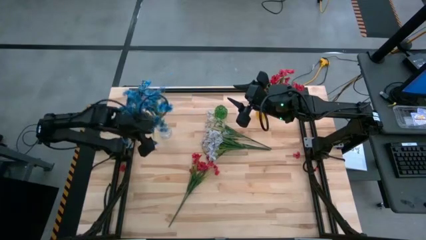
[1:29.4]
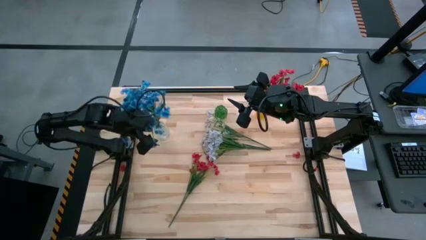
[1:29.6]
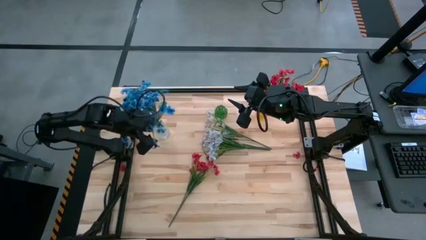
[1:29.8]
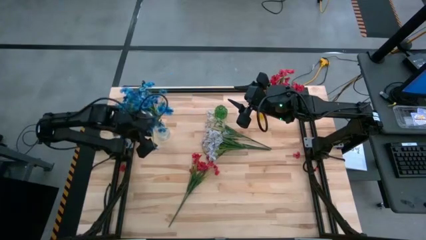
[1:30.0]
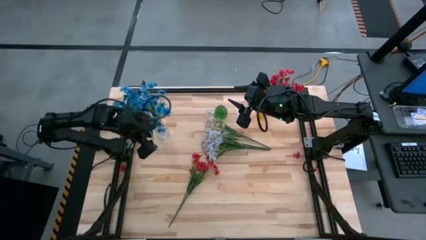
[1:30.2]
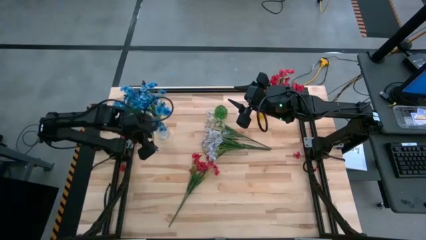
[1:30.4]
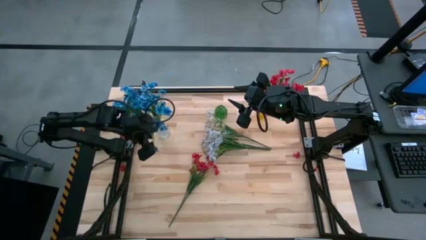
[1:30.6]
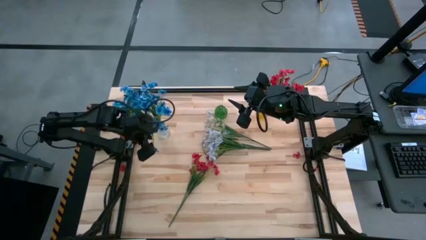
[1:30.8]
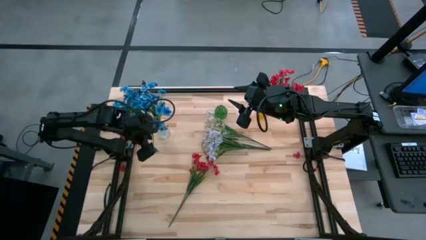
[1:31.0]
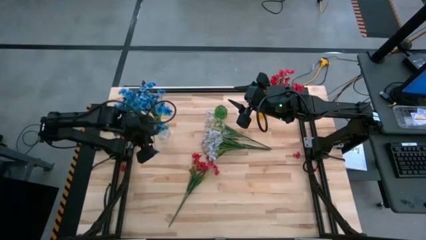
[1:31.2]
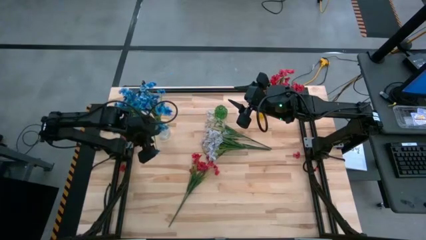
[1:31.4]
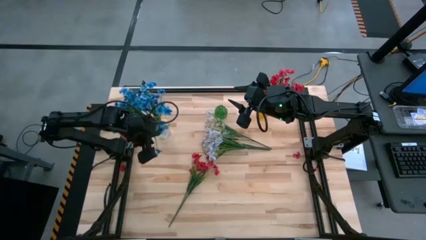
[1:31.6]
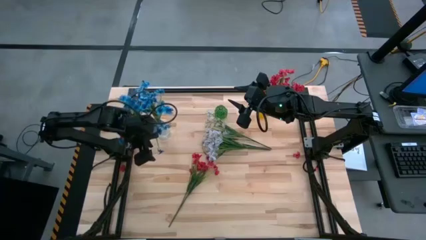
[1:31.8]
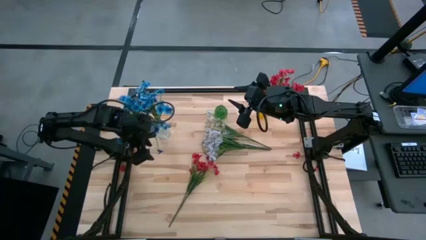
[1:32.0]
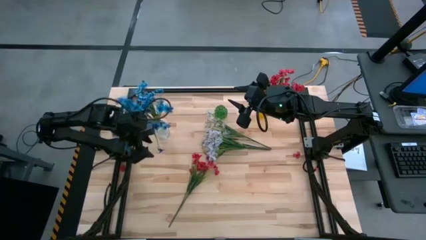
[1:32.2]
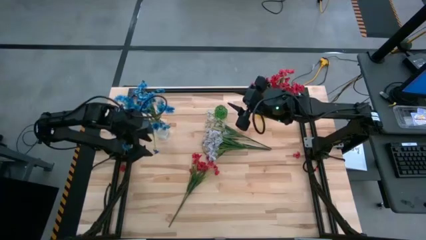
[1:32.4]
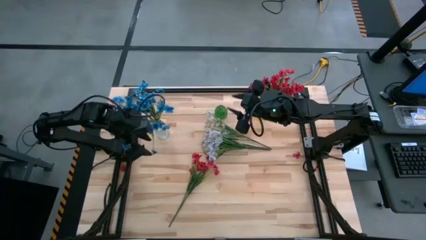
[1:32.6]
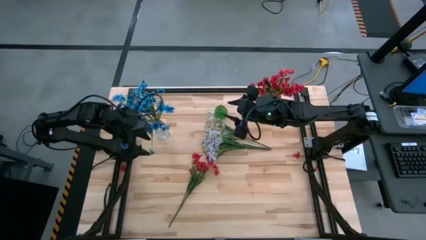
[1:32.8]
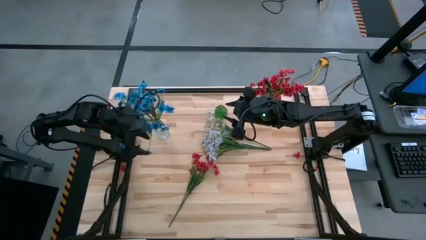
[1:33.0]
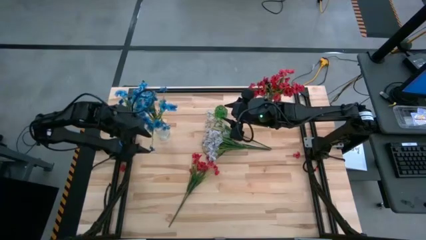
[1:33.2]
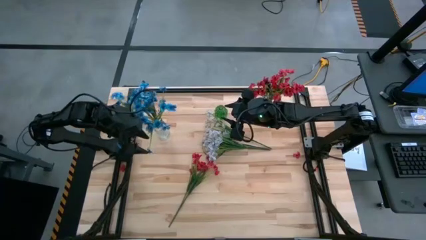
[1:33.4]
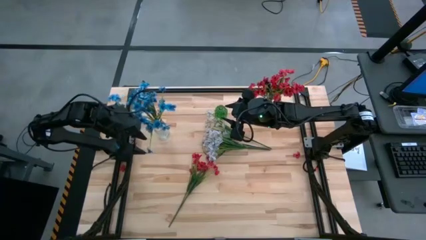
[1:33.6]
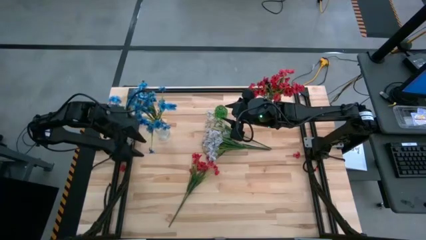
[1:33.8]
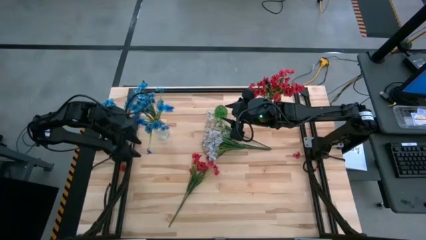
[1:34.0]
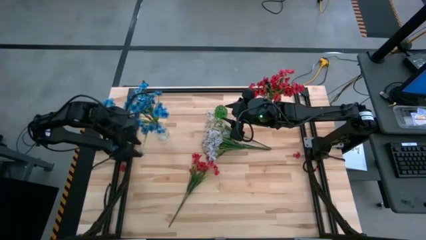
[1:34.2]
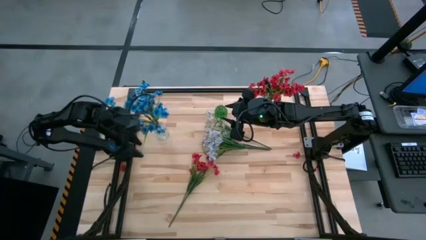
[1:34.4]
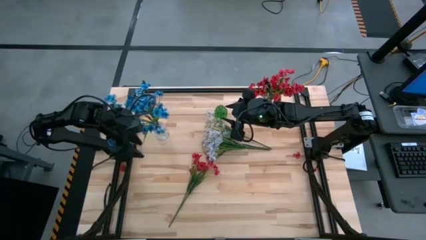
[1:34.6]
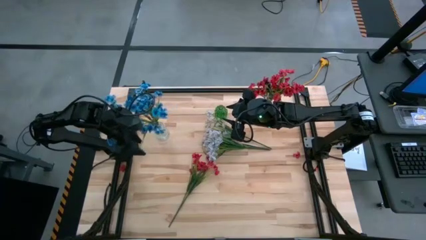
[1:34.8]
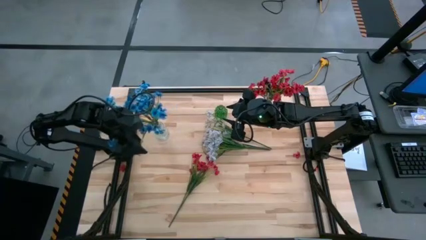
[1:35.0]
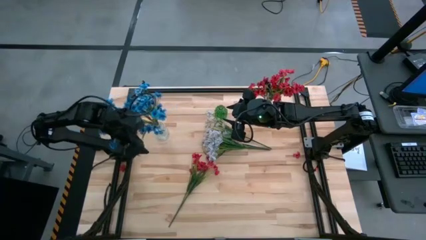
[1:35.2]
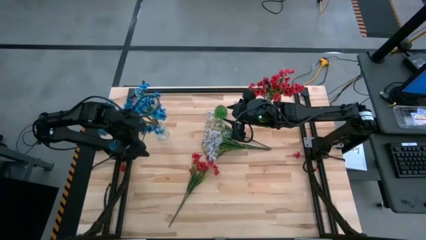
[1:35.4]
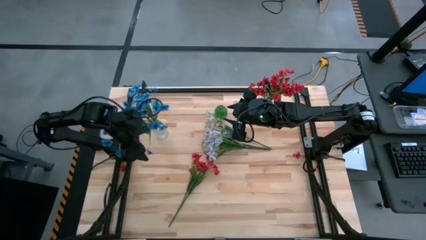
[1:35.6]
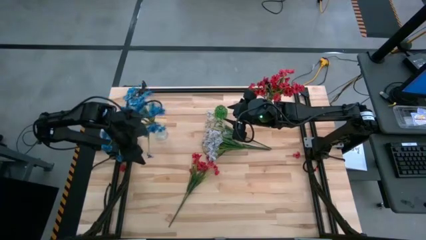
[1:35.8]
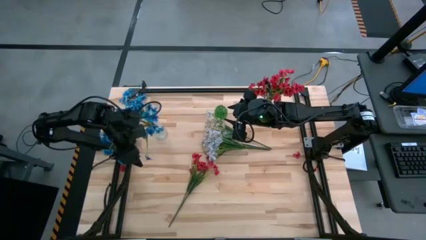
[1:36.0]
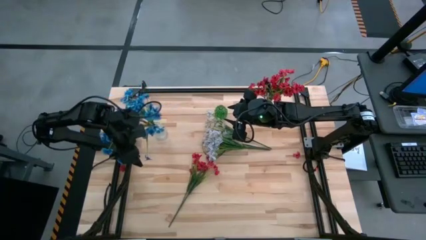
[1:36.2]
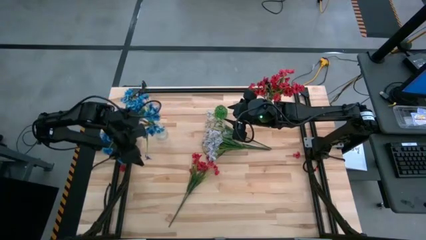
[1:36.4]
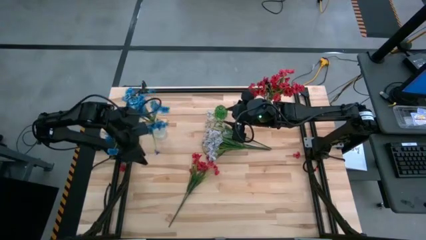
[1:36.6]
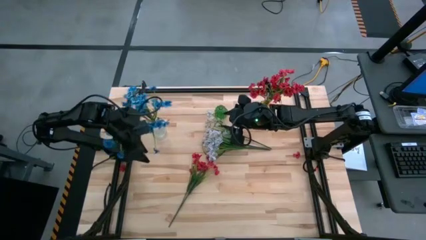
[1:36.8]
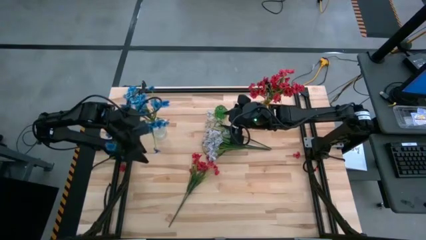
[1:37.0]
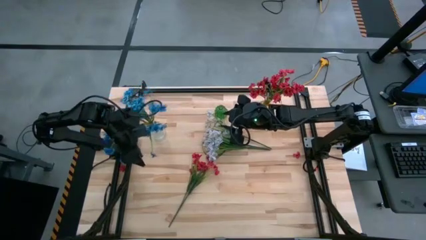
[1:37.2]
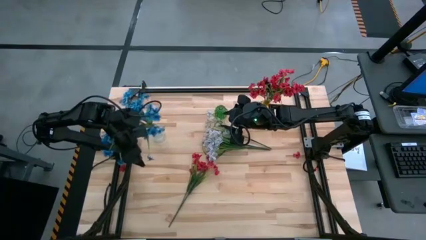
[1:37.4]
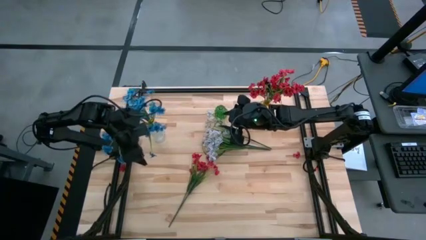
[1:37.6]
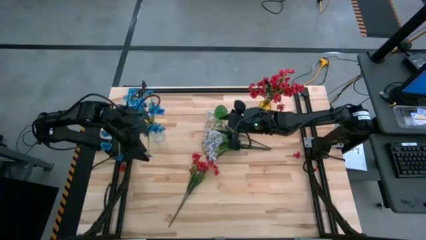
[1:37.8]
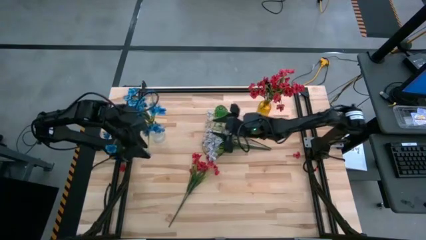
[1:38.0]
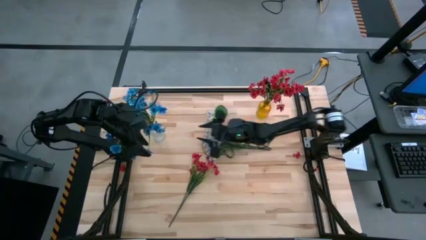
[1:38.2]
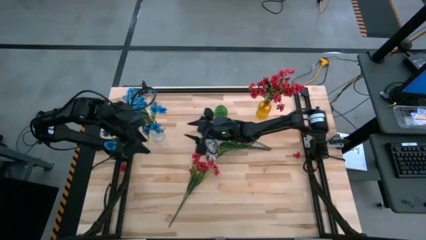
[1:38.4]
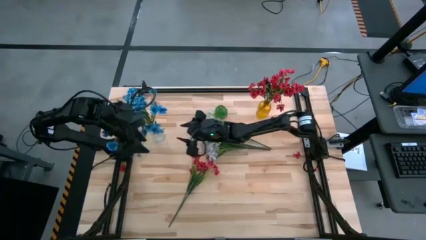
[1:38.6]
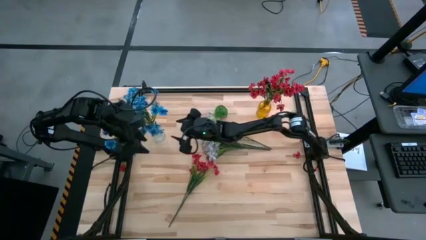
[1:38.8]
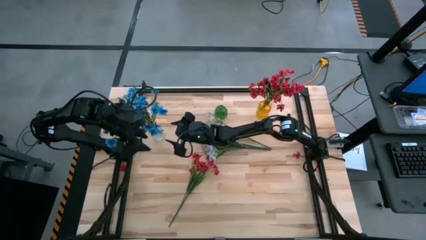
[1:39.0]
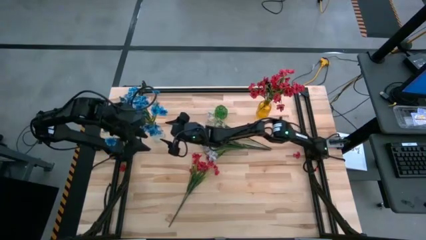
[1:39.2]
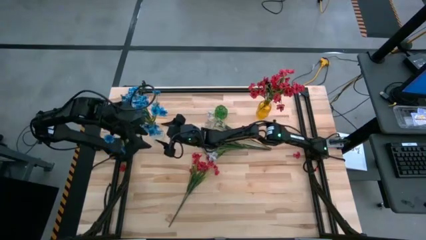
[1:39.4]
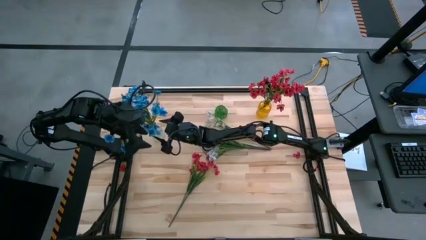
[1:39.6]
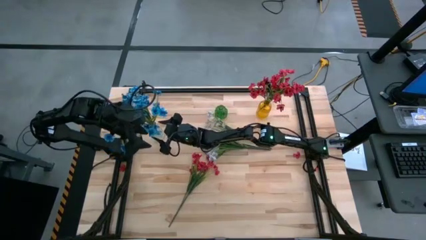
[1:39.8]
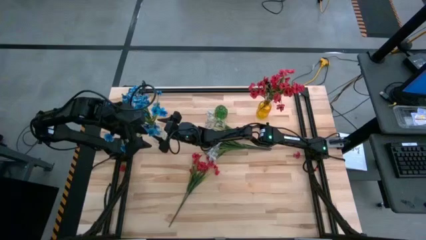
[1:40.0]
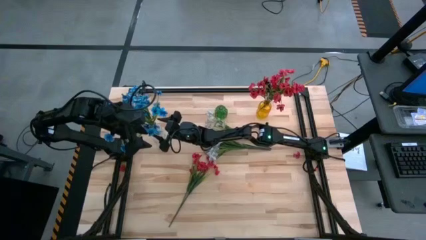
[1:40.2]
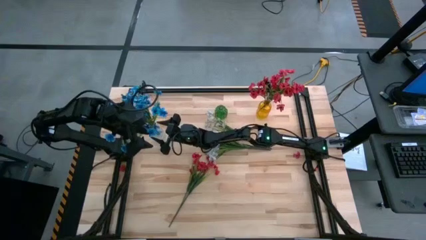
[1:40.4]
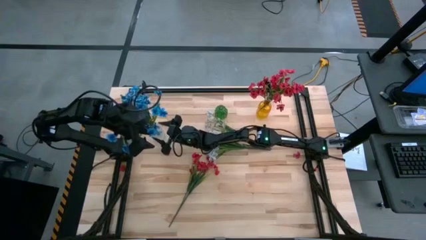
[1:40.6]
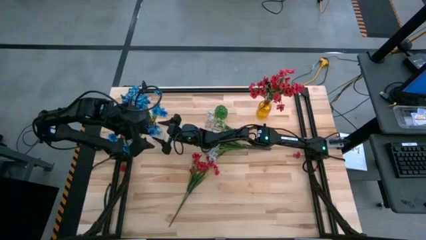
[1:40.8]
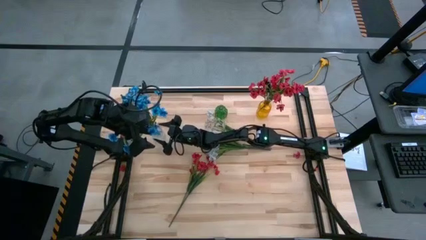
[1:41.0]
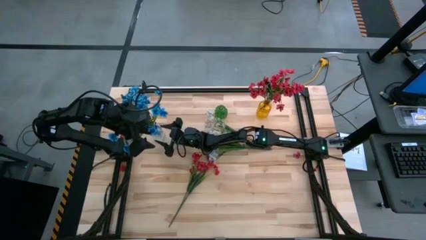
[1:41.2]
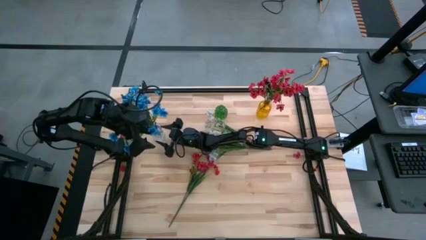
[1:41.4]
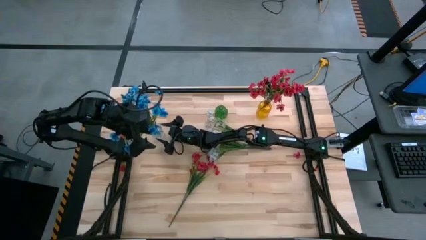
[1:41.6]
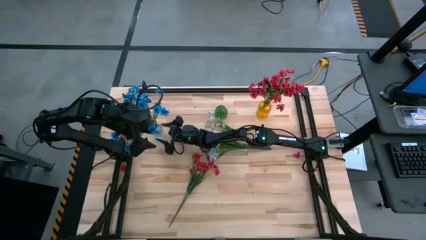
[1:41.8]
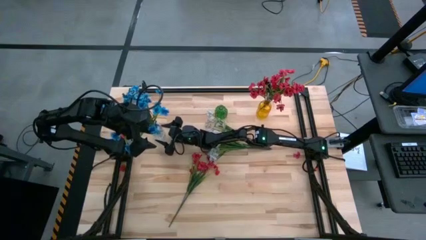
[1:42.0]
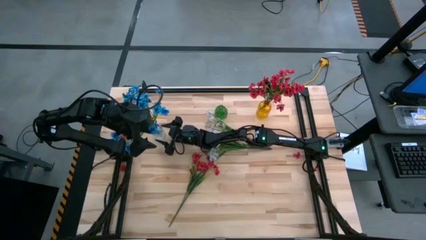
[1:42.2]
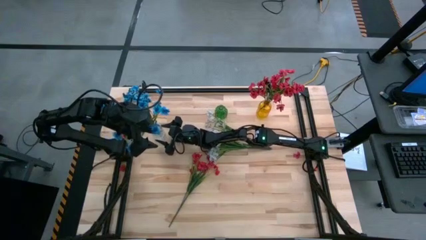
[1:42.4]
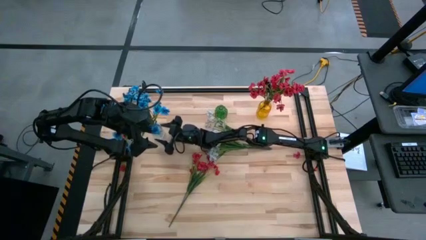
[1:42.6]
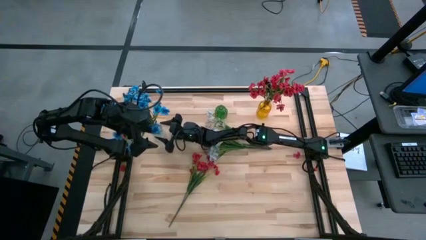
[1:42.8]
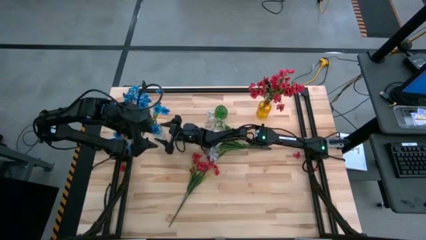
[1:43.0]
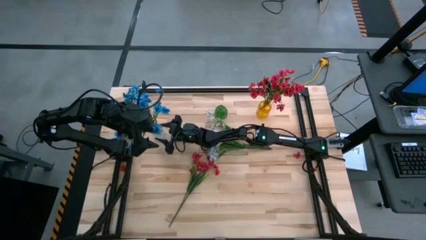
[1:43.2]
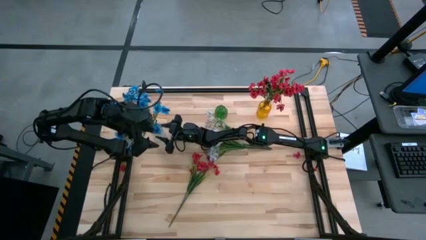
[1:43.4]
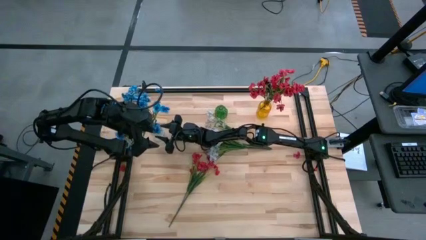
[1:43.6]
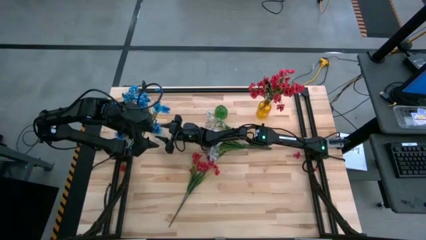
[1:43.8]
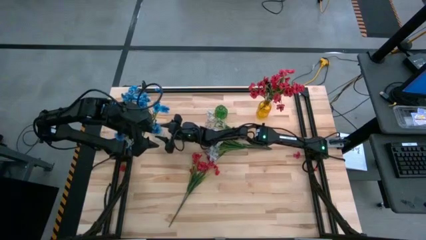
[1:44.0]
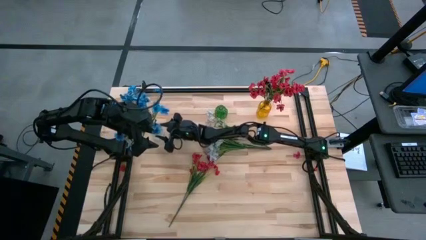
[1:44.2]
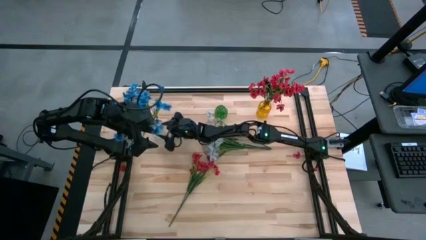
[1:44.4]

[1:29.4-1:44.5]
Task: Sort flowers into vase by color
Put the blue flowers into the transparent vase
